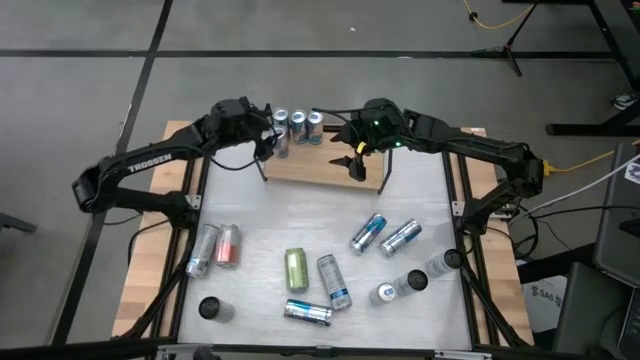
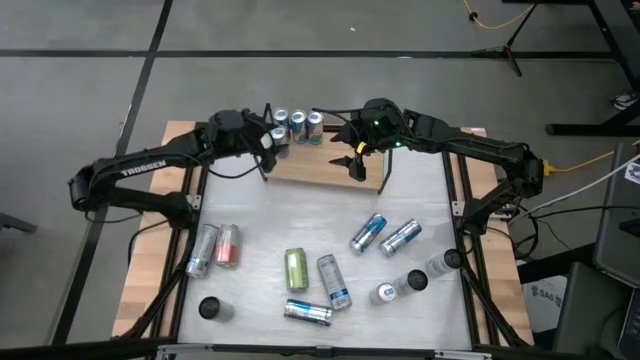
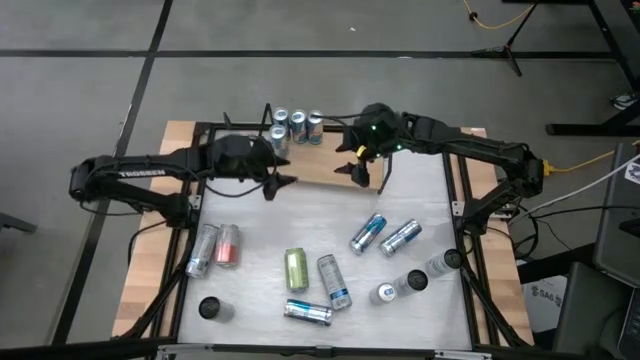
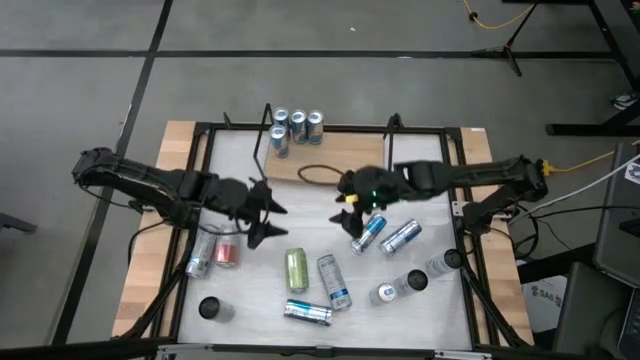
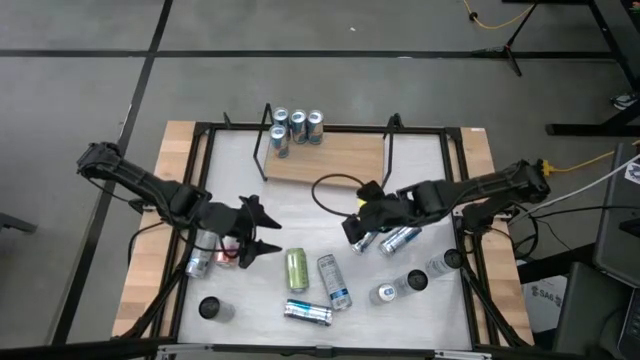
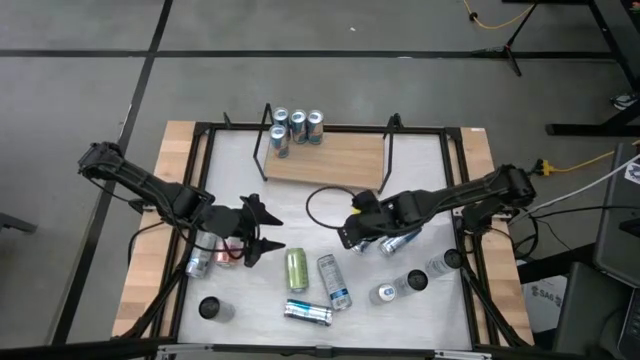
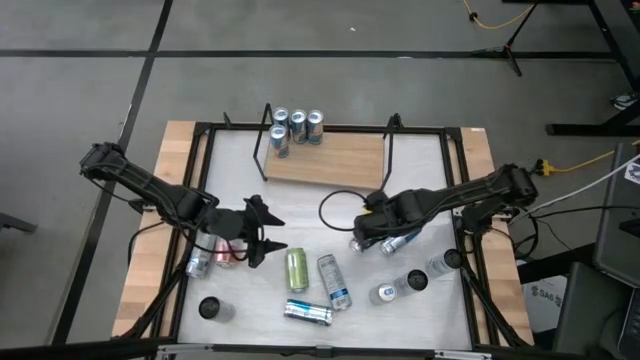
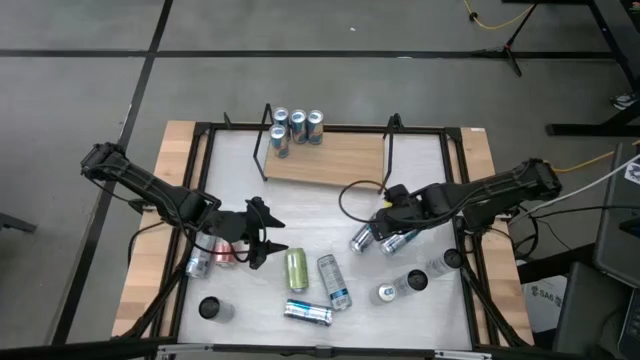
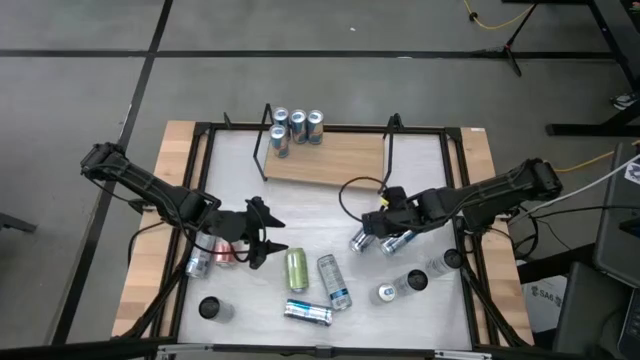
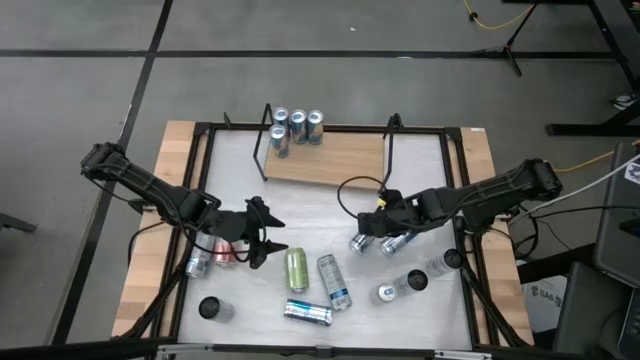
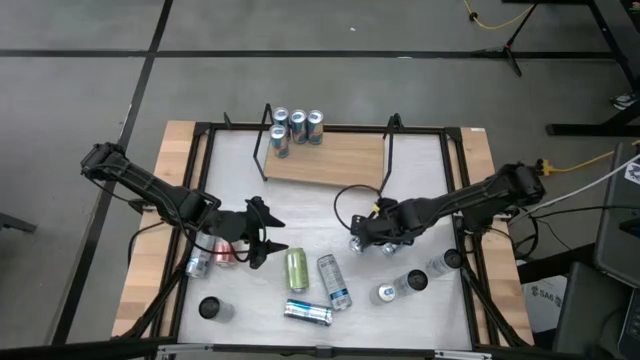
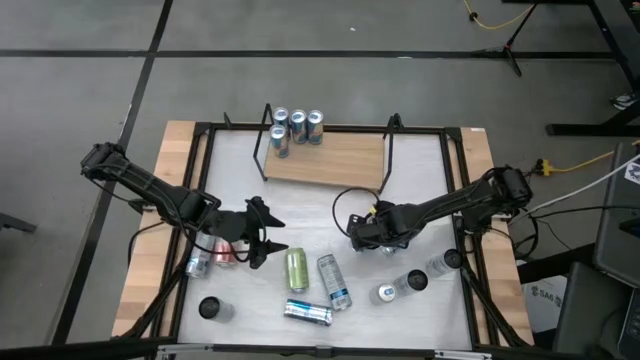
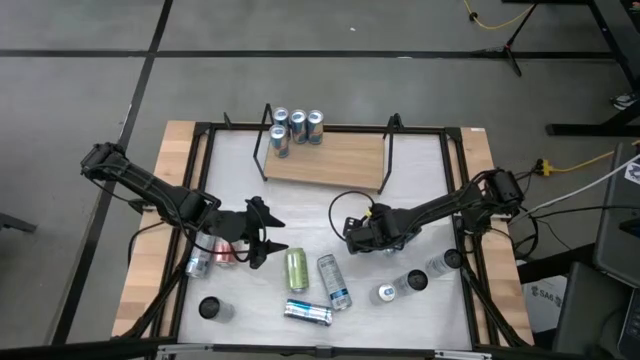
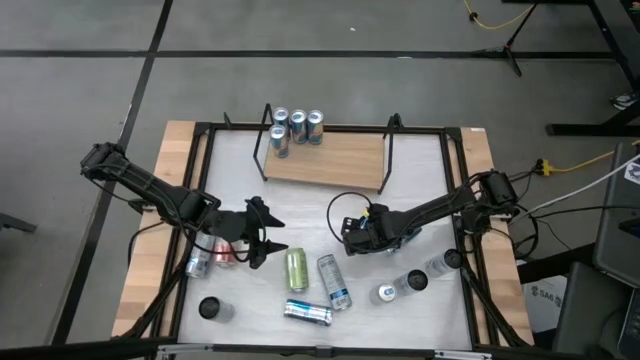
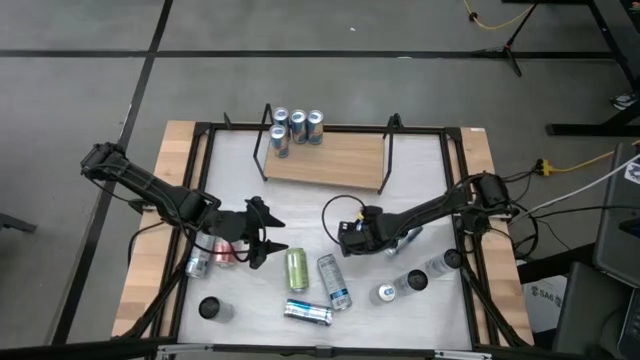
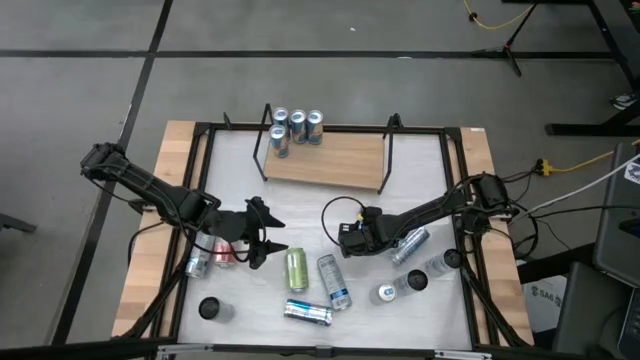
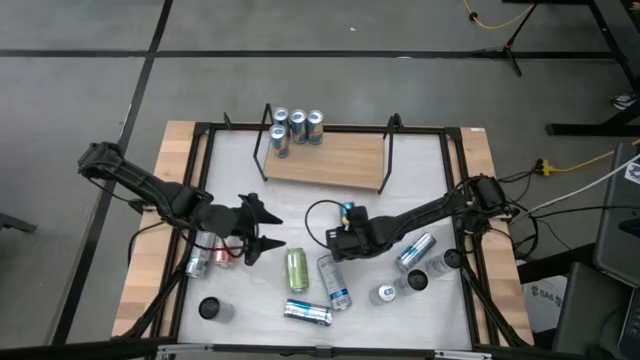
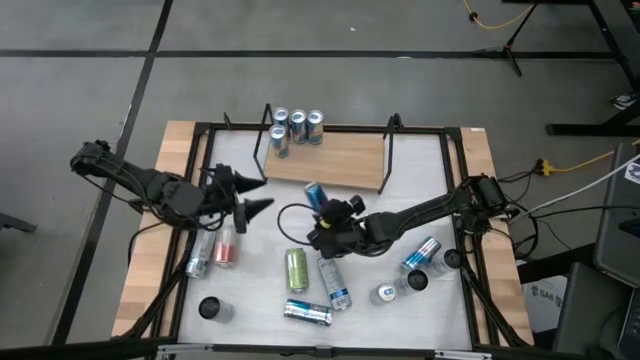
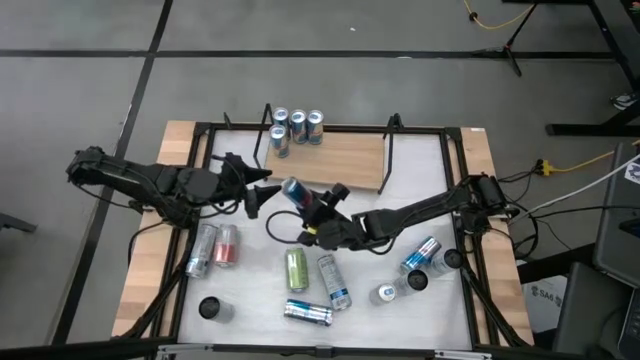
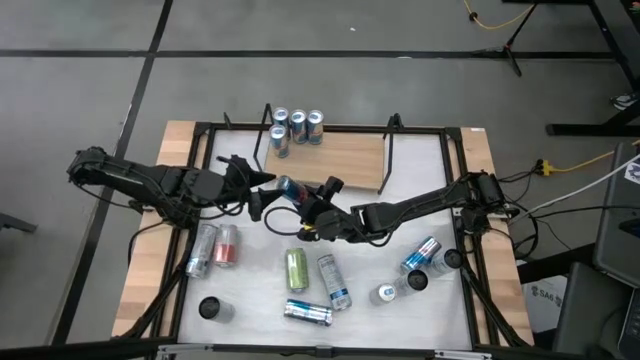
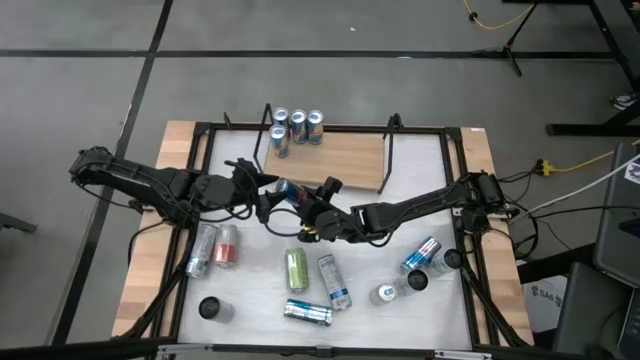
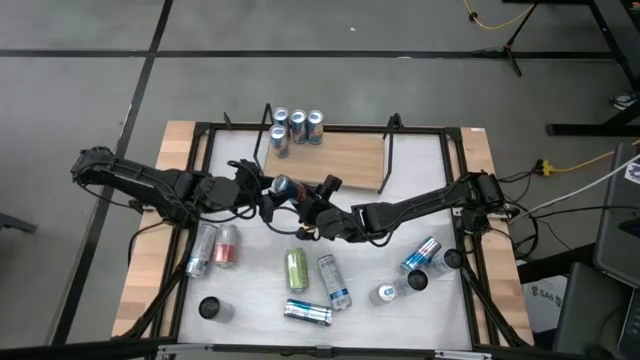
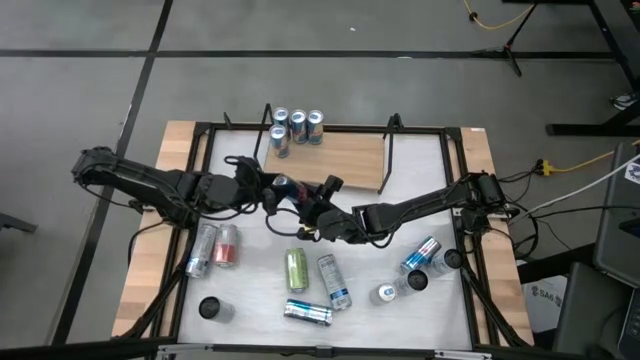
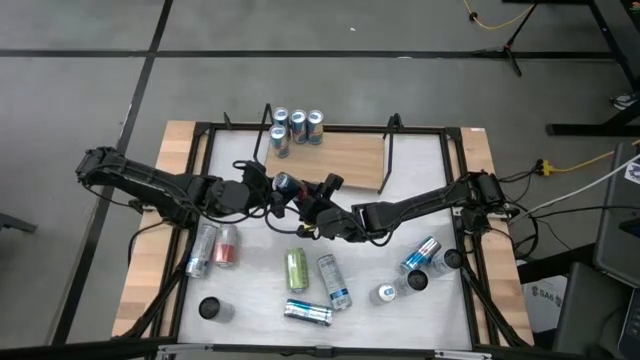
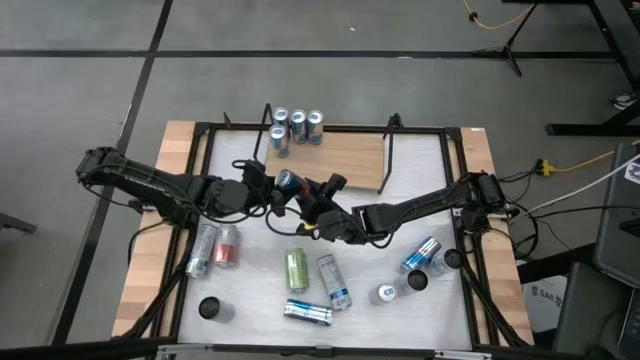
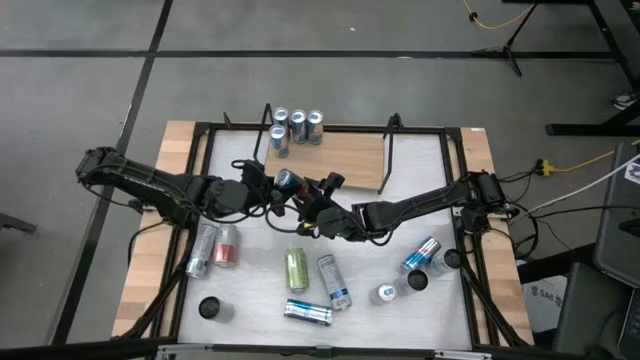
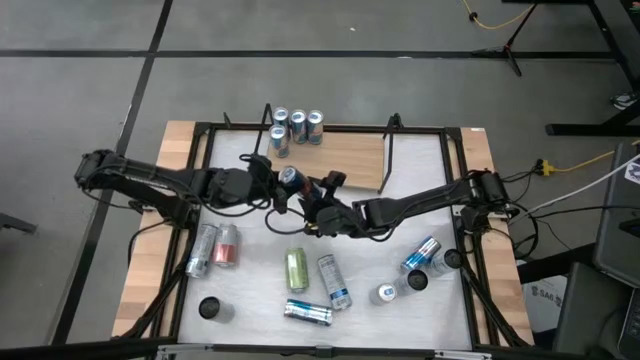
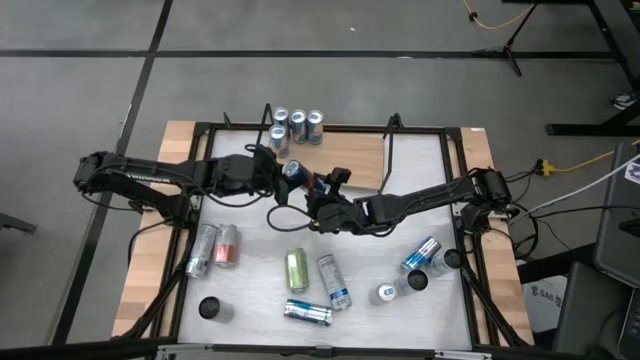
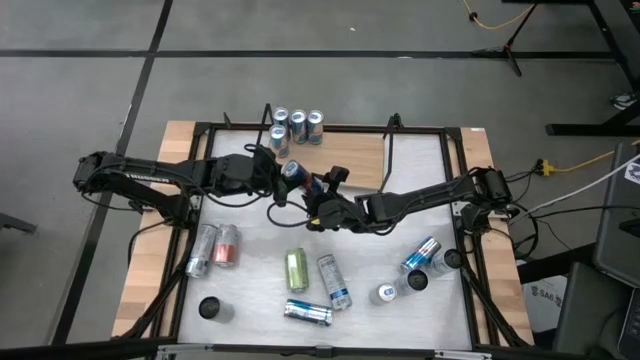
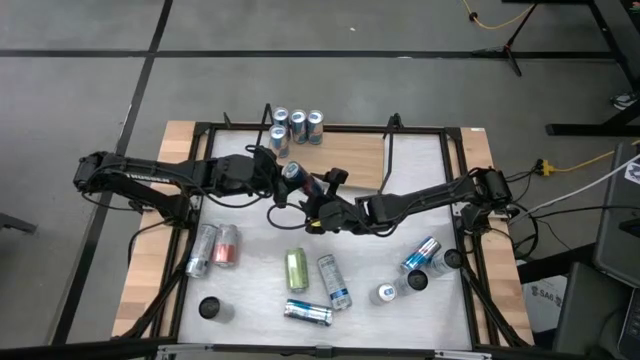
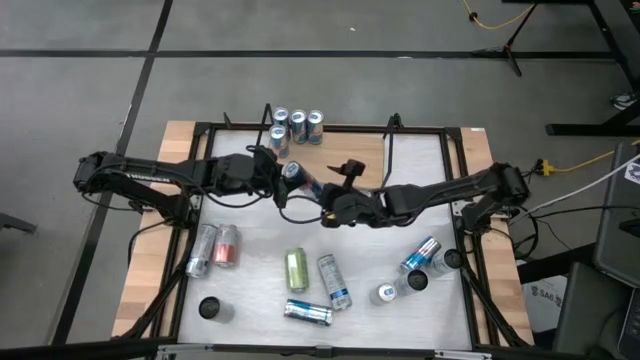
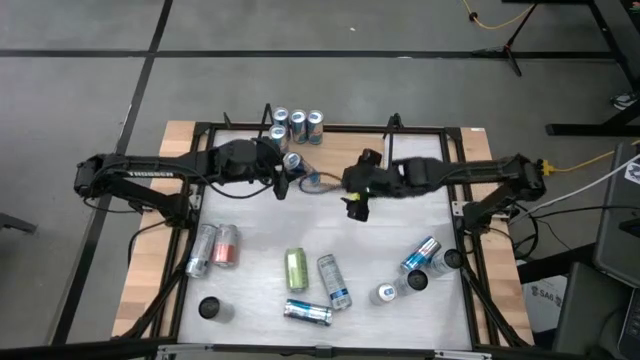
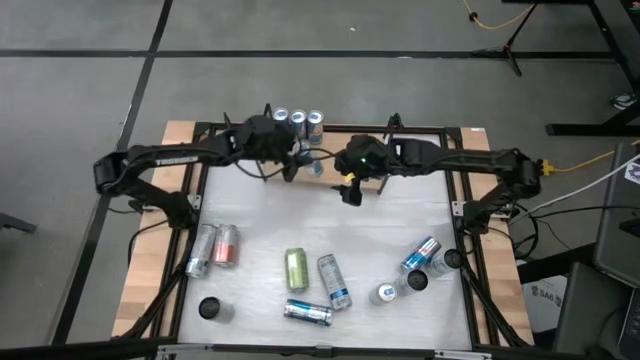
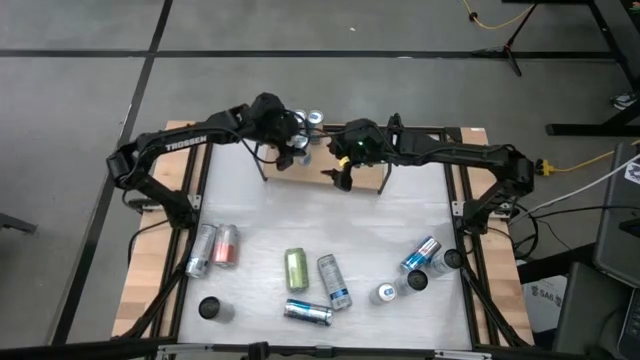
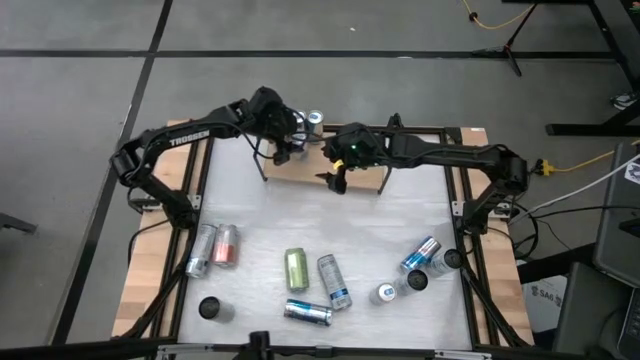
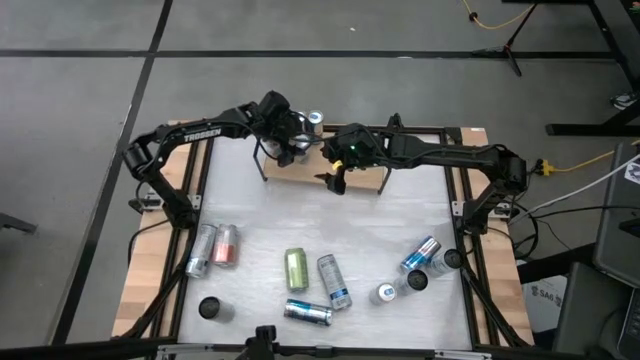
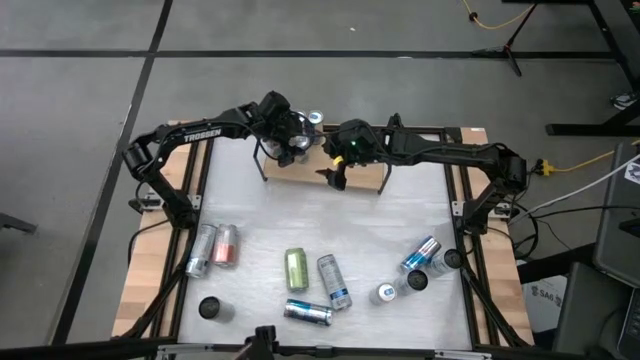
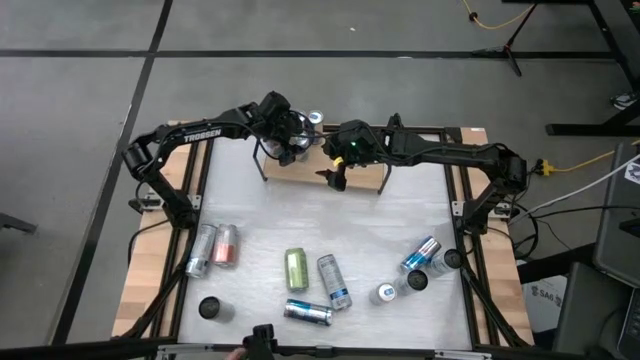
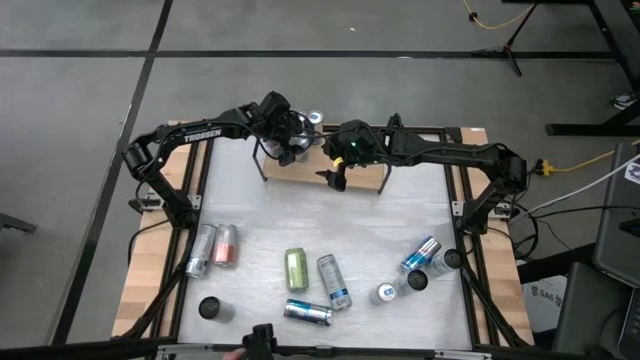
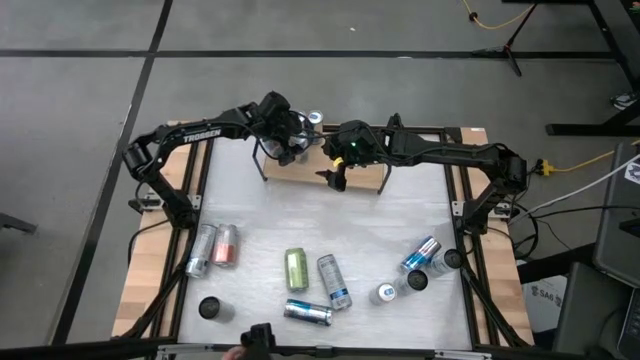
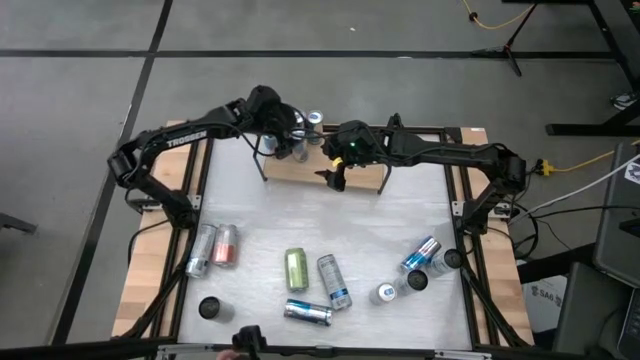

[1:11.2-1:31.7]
Task: Place canned beverage on shelf
Put the blue soda can on the shelf aligned with the other blue soda can

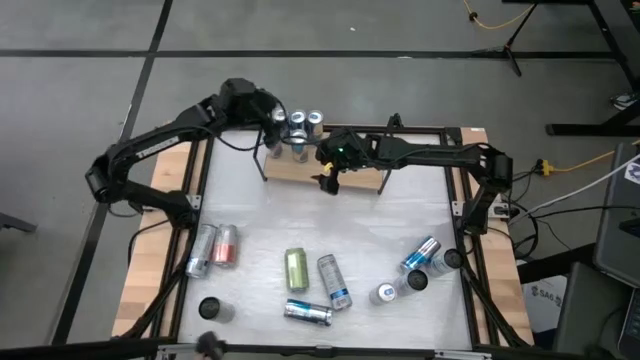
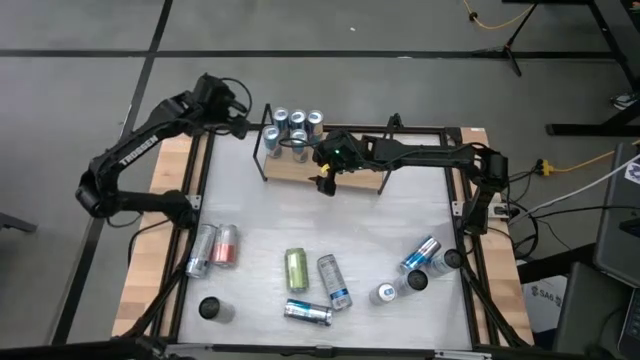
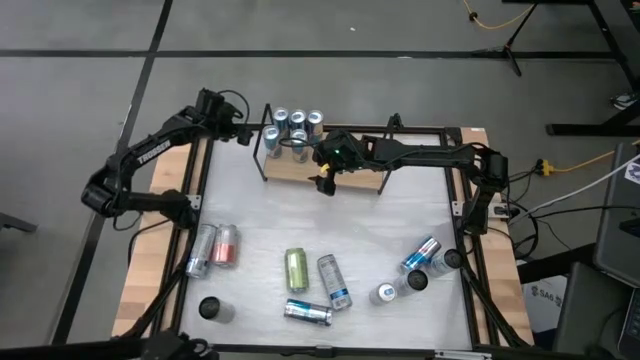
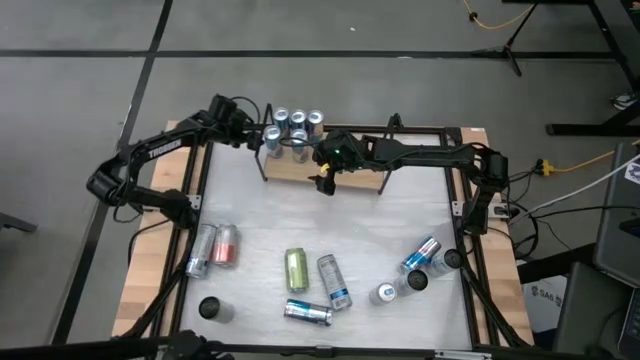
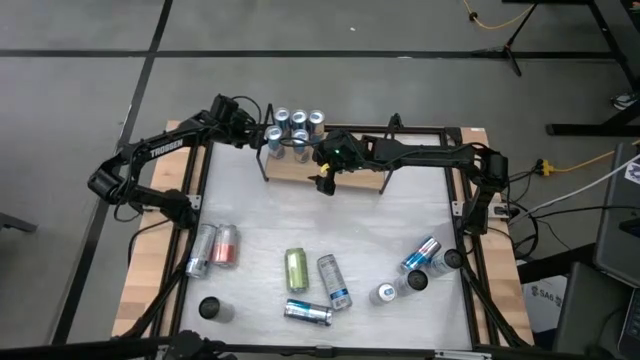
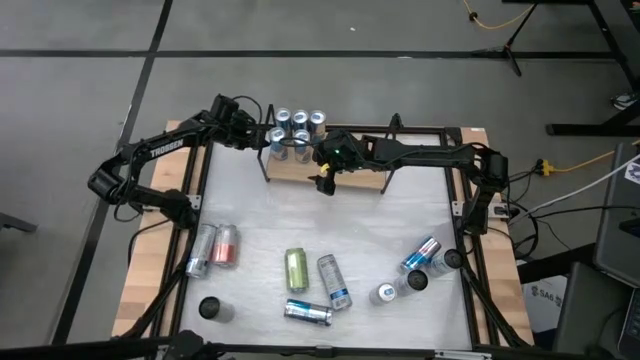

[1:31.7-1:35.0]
Adjust the blue soda can
